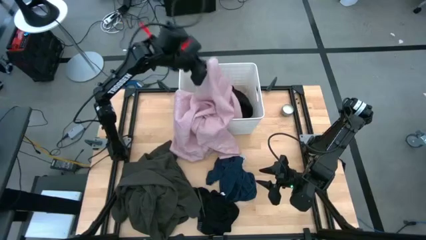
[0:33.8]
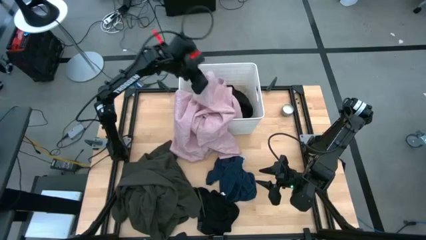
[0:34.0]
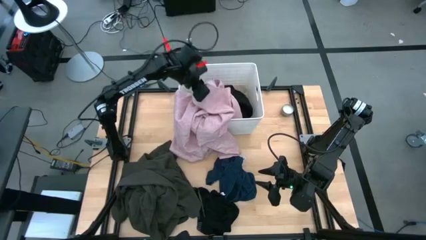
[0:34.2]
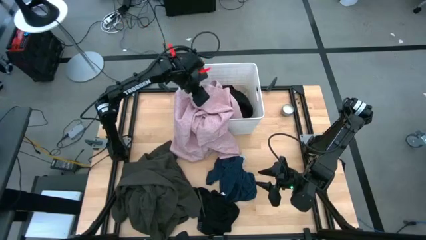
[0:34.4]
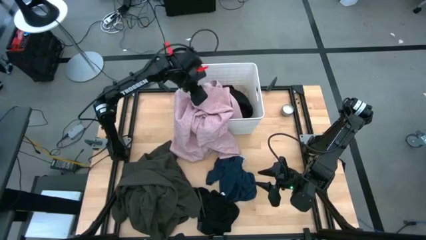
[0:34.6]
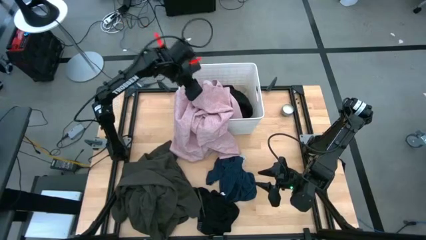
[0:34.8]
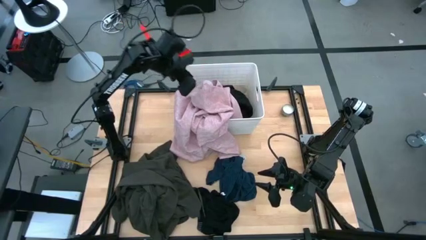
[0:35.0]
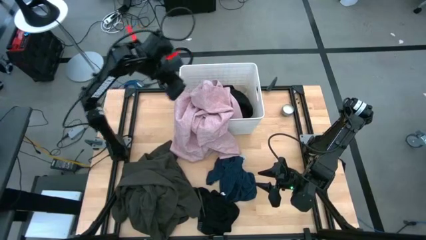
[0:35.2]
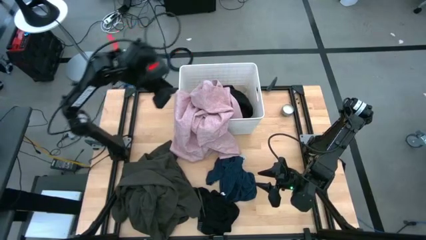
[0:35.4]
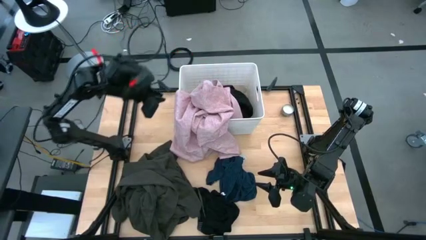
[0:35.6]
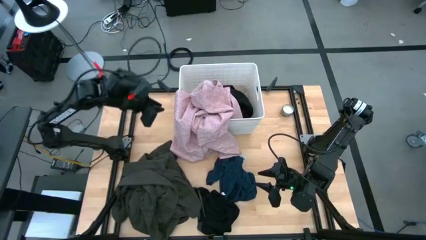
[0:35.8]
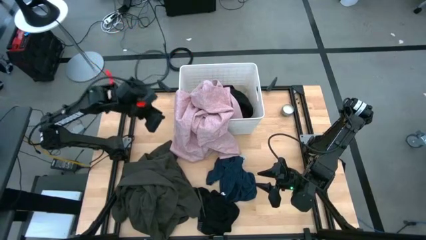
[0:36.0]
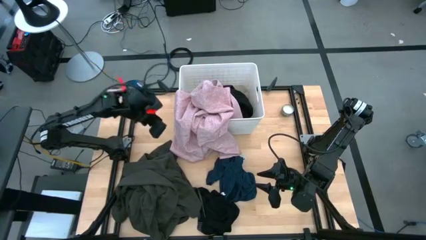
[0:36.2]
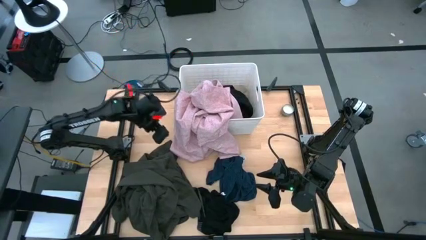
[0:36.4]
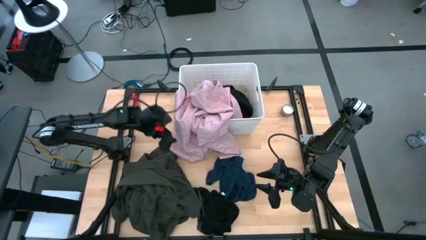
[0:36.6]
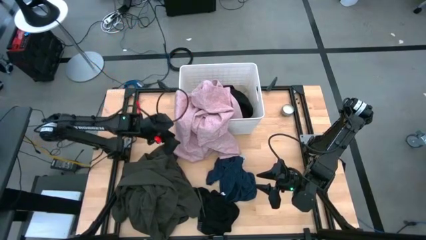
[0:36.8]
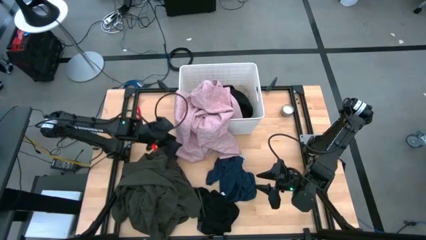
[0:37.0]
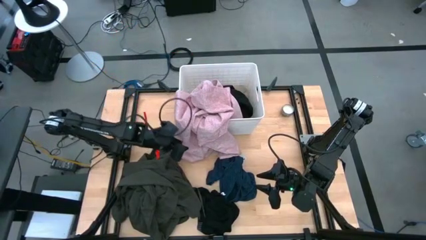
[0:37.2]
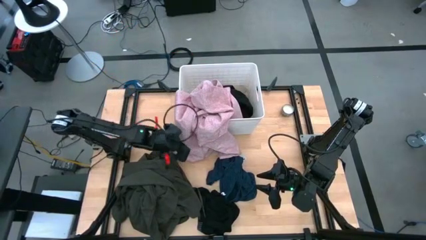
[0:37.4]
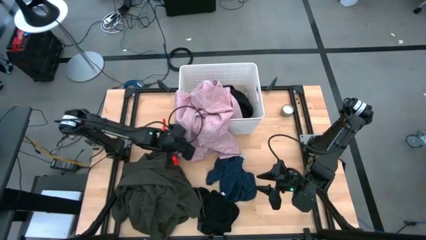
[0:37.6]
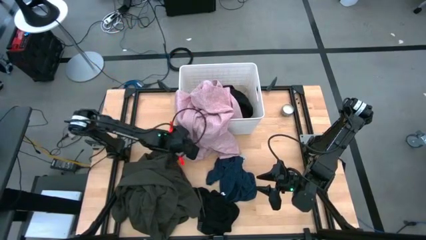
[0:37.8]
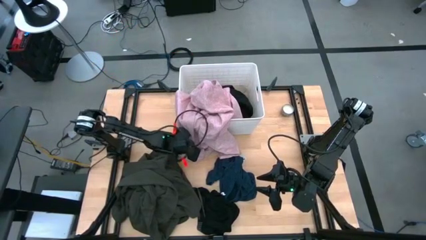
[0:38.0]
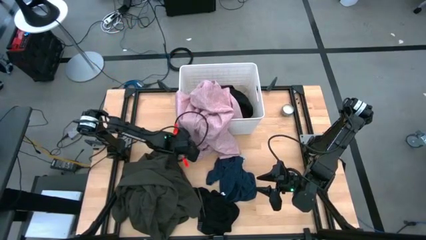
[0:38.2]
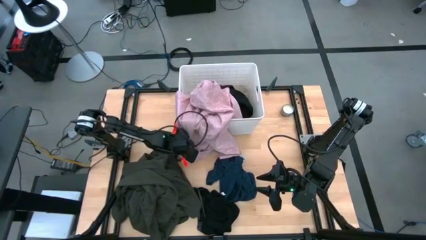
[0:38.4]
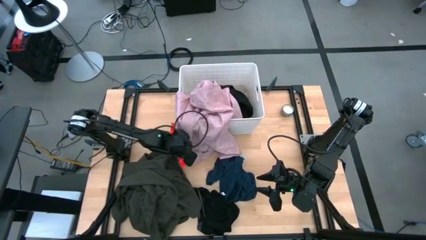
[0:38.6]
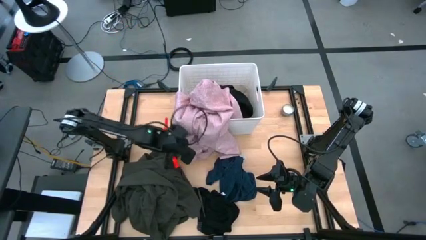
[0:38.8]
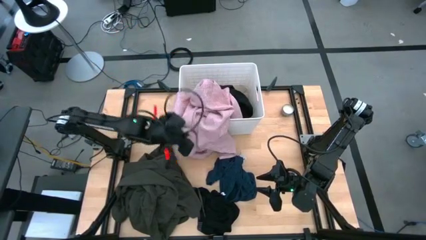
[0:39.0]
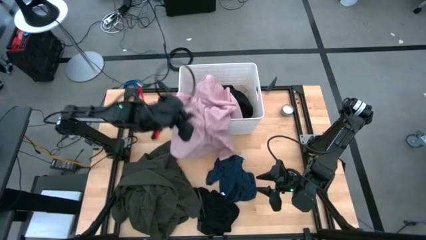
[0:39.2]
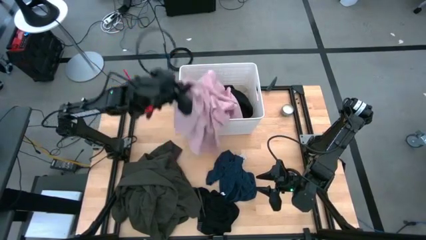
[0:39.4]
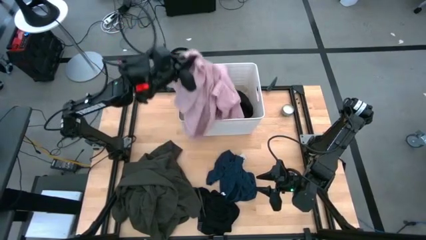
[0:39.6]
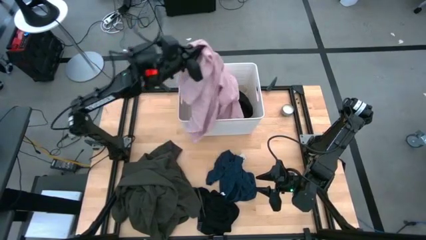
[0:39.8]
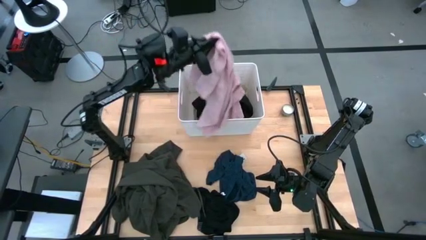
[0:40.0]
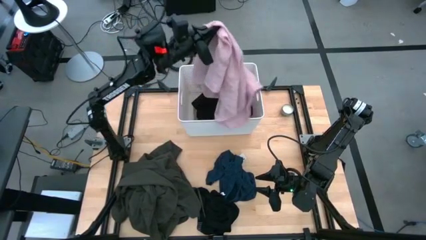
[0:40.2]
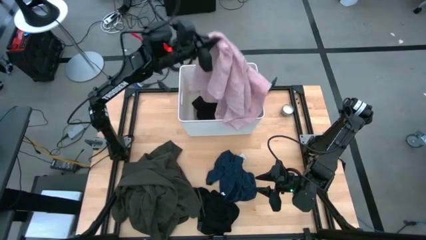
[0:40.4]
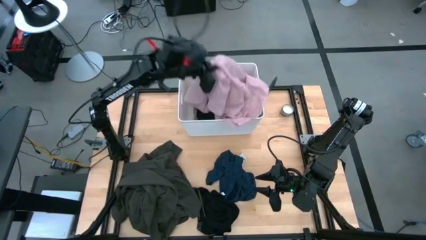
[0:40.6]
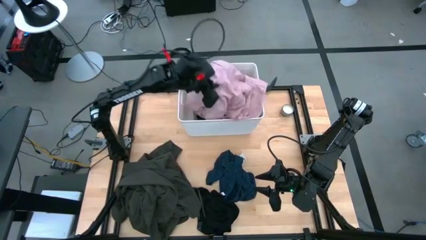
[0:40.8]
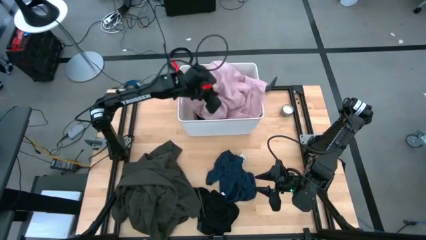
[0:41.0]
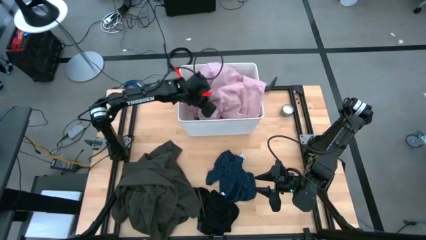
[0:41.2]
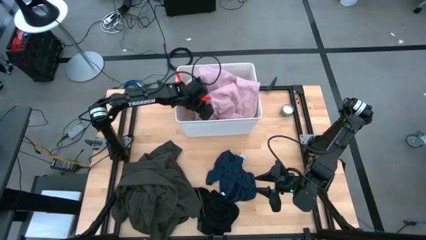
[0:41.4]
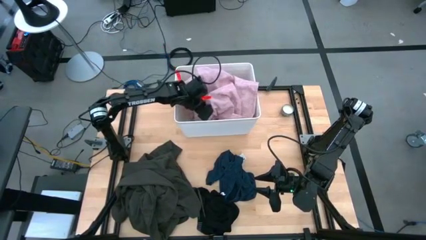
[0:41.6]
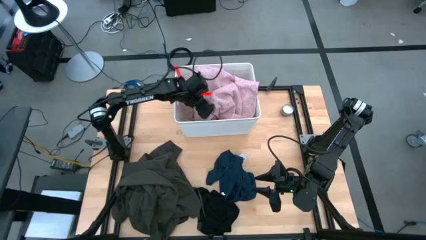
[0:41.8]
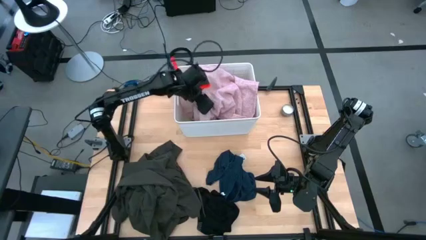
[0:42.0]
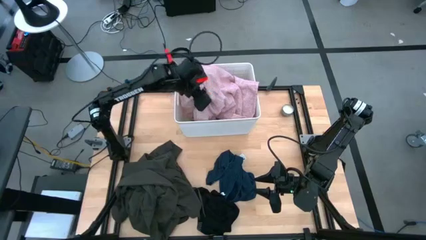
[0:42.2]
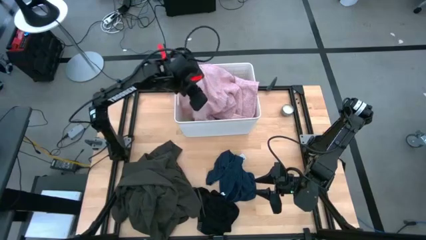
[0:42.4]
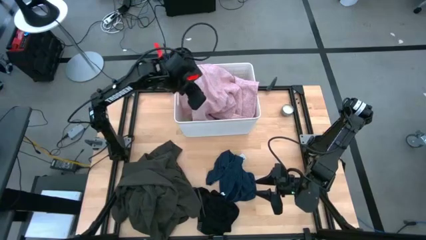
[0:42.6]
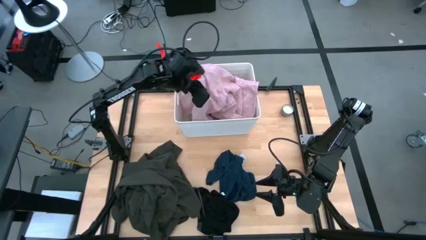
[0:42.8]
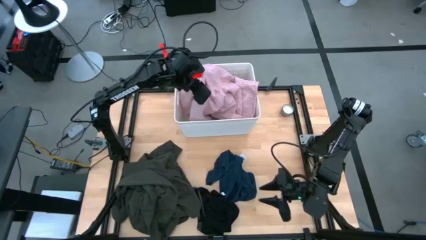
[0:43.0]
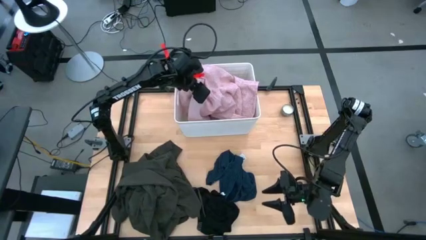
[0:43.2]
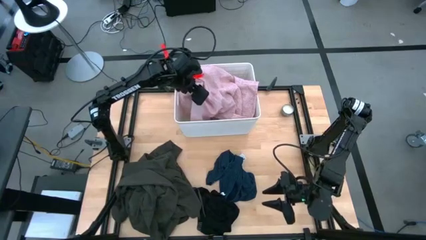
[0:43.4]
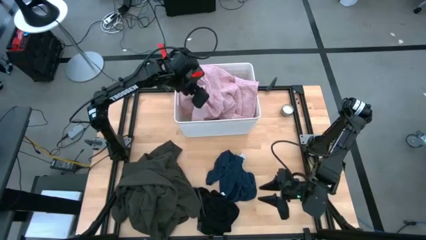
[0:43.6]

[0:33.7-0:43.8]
Task: Sort clothes
Put the pink shirt into the white bin

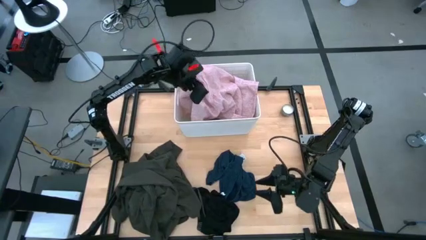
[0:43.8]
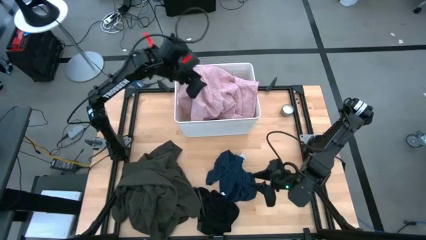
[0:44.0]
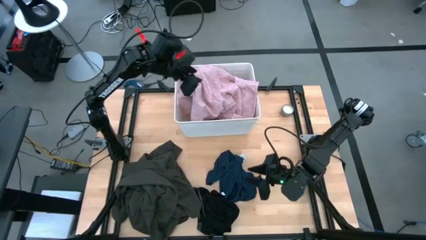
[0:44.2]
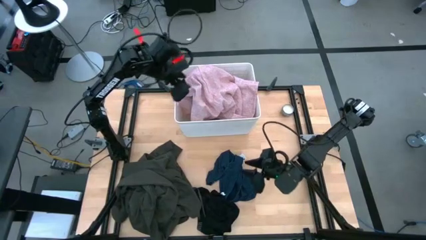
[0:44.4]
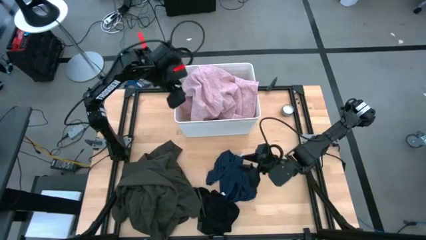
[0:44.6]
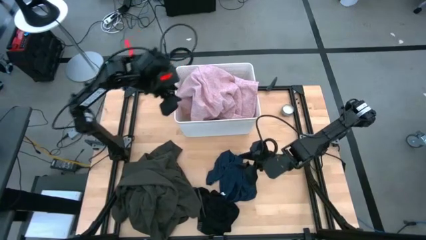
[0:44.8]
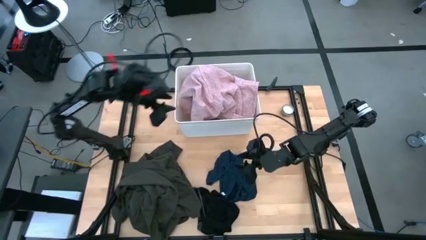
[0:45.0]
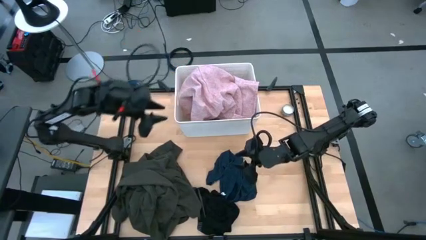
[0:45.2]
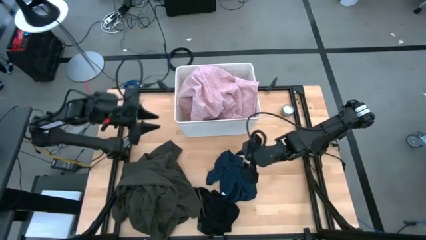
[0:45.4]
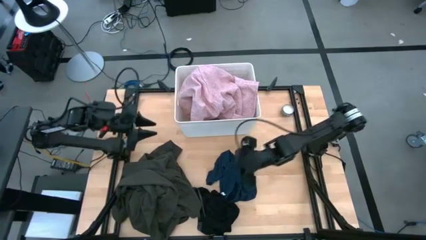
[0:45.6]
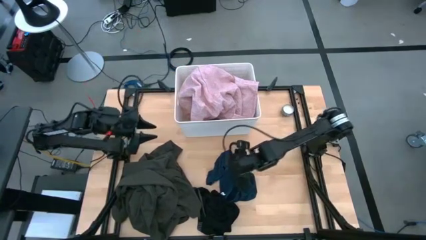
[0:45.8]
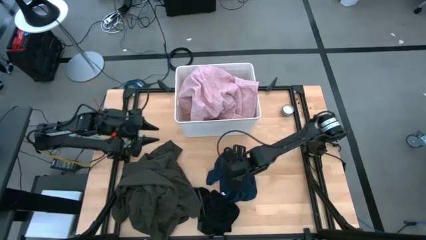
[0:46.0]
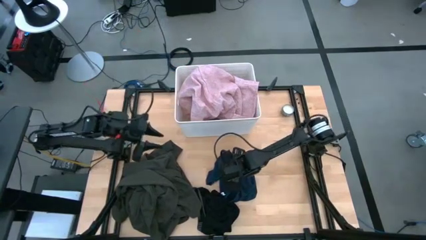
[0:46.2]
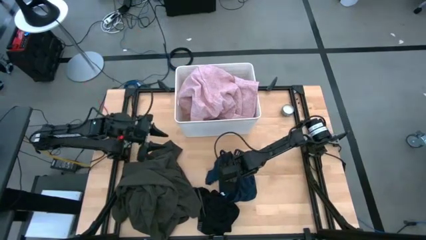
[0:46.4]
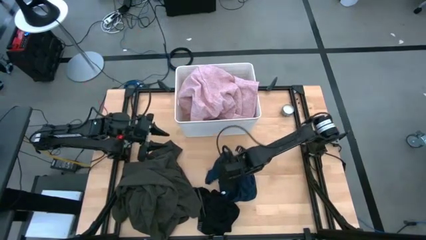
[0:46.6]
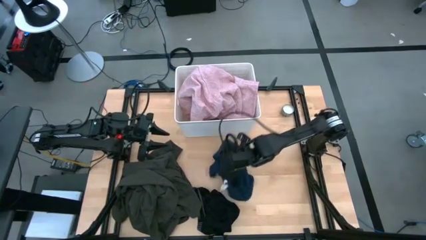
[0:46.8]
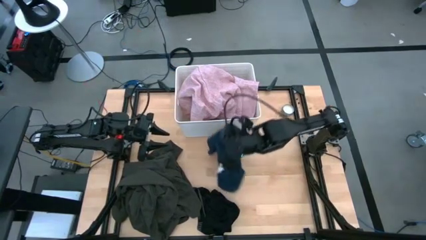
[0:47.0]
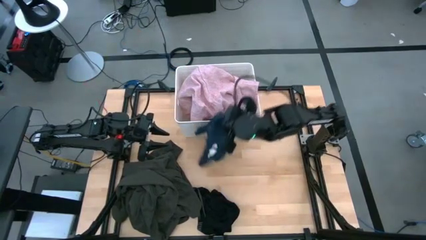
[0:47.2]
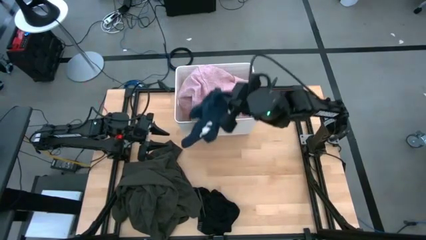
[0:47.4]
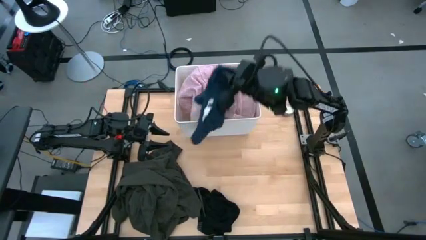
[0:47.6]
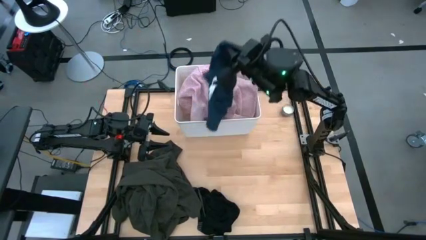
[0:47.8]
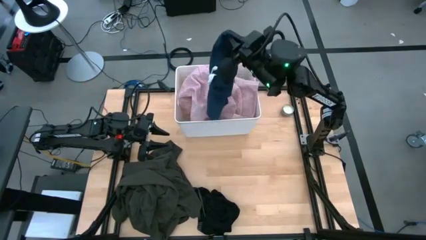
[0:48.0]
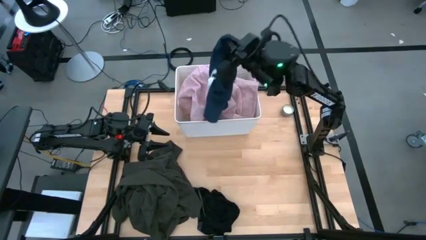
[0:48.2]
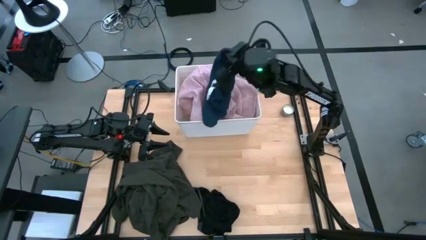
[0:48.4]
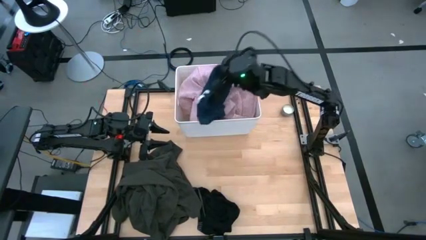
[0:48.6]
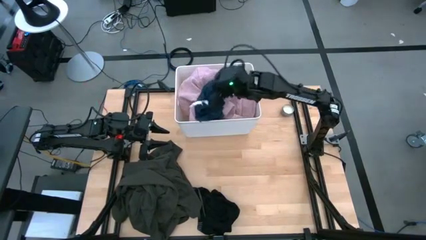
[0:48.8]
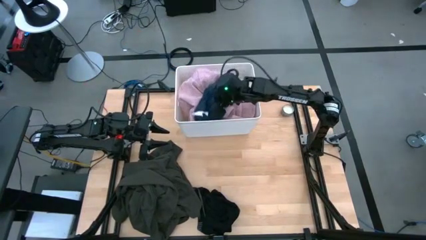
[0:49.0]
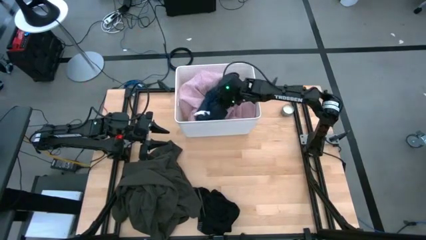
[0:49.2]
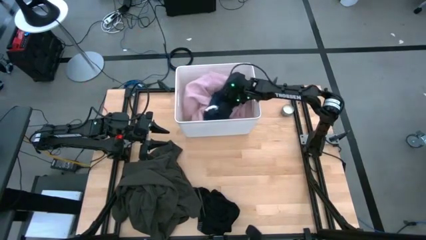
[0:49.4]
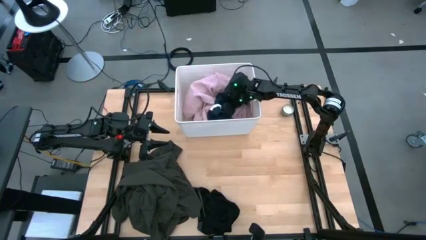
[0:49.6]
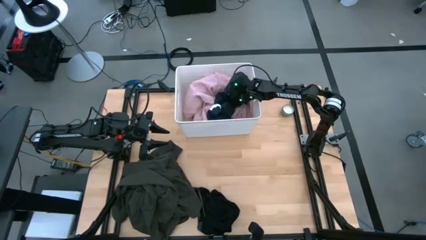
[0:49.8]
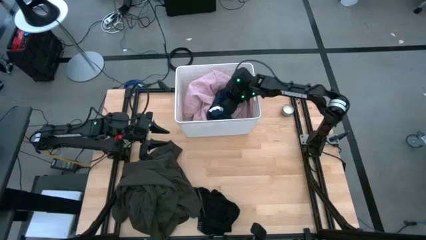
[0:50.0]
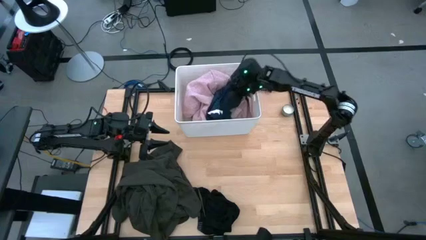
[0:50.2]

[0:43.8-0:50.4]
Put the blue underwear into the white bin
